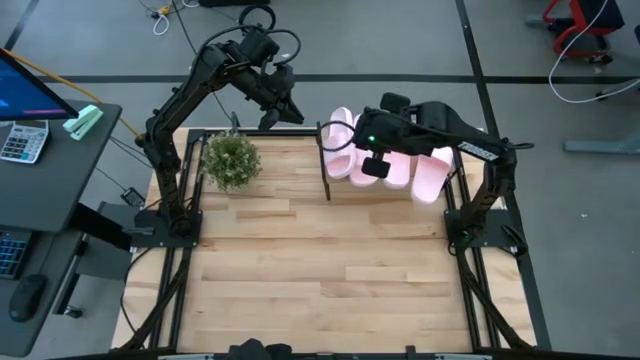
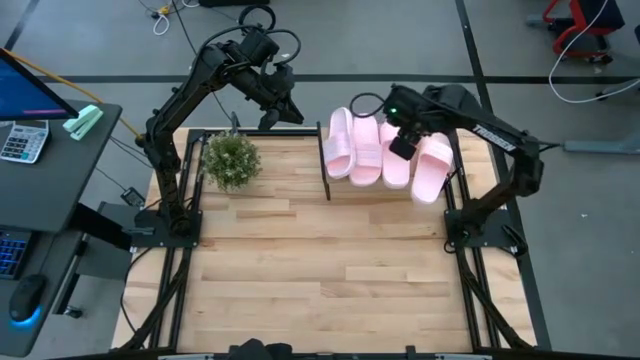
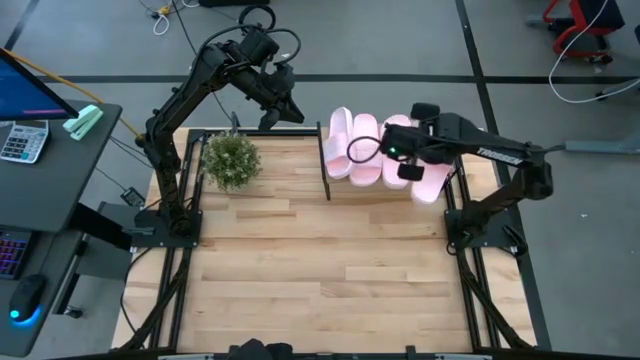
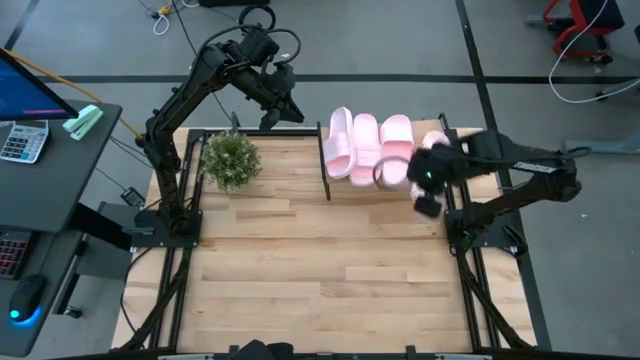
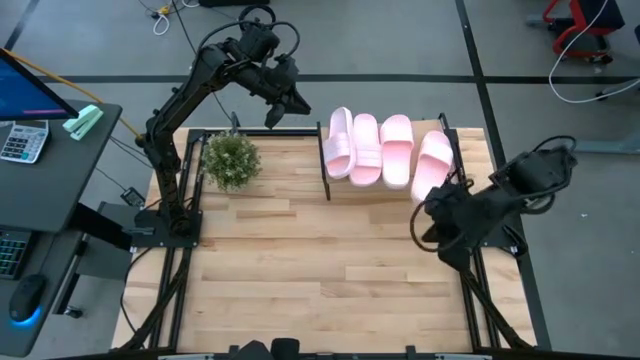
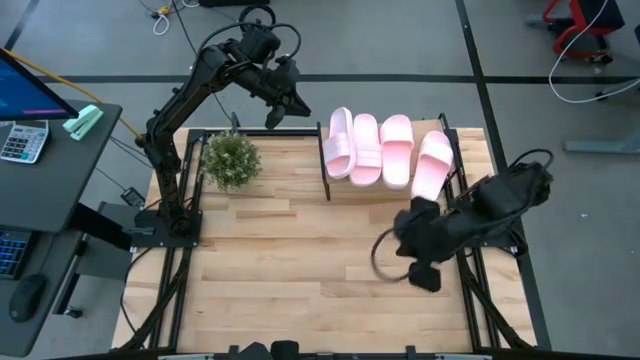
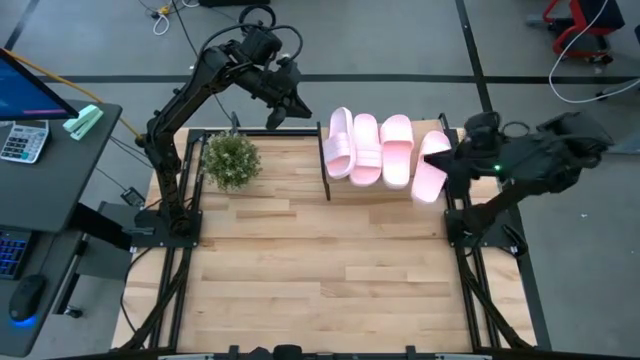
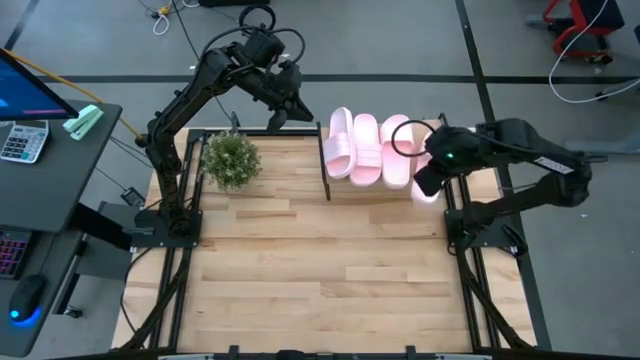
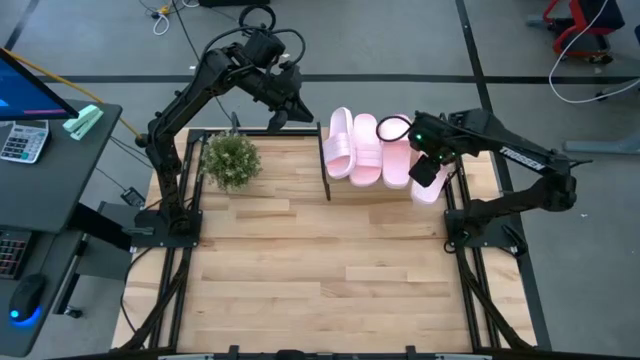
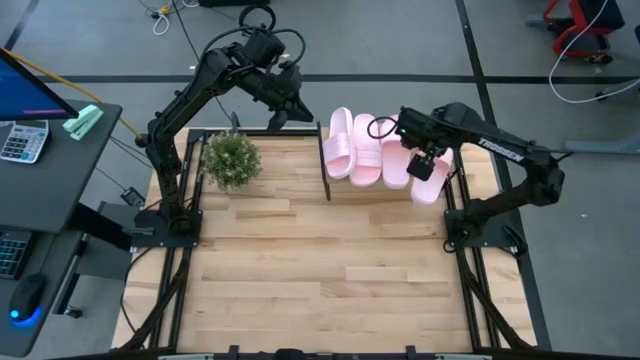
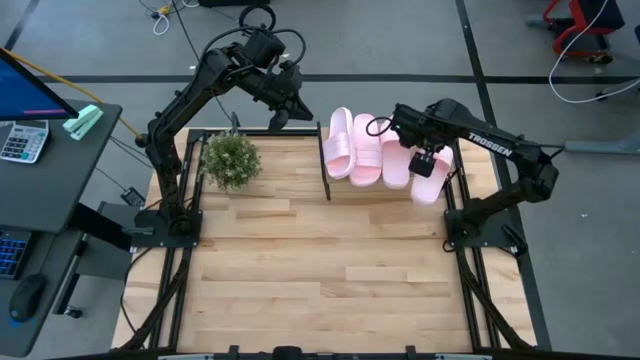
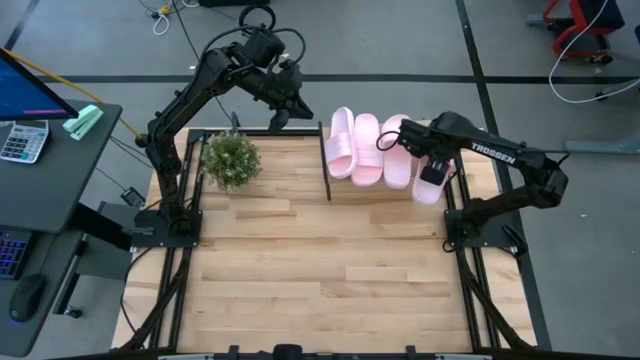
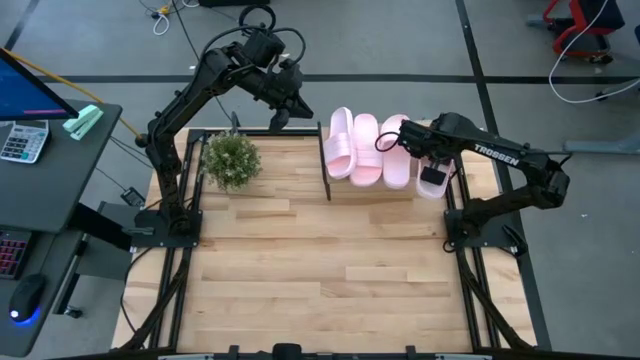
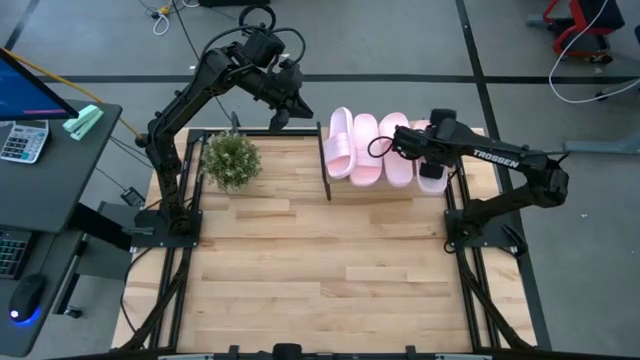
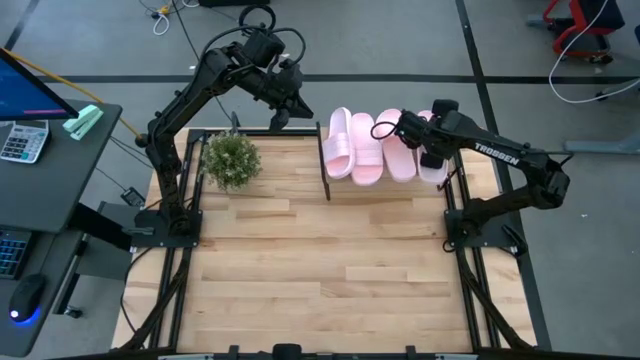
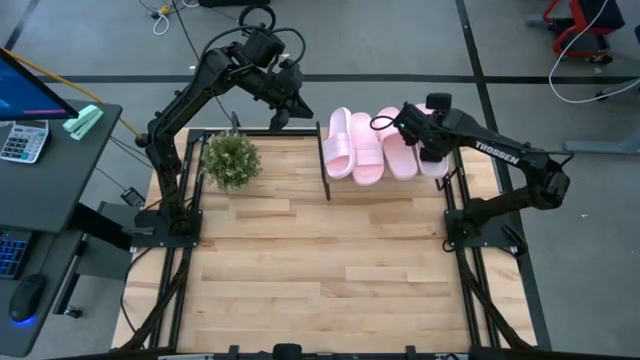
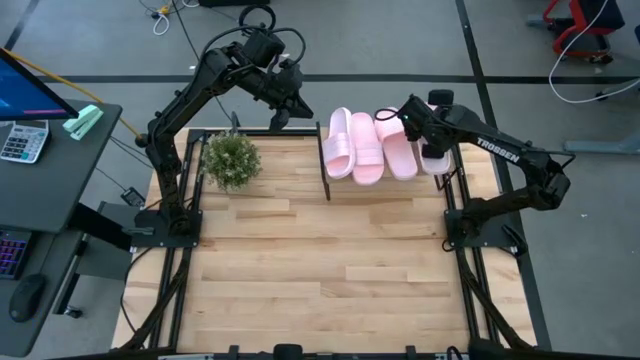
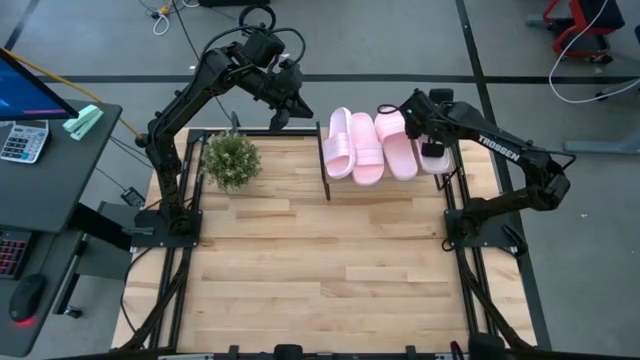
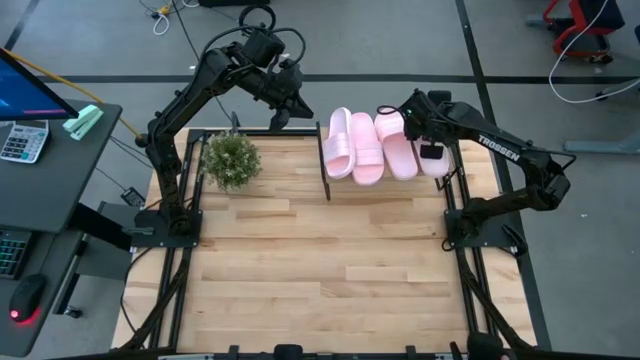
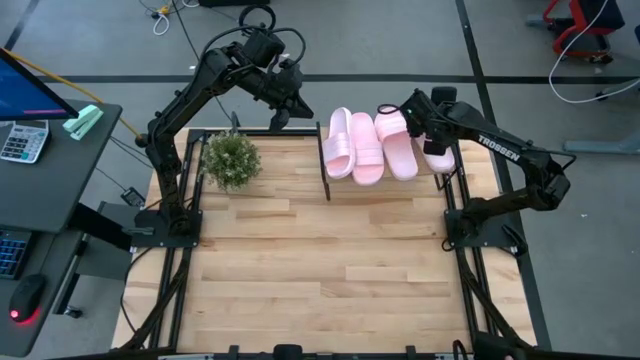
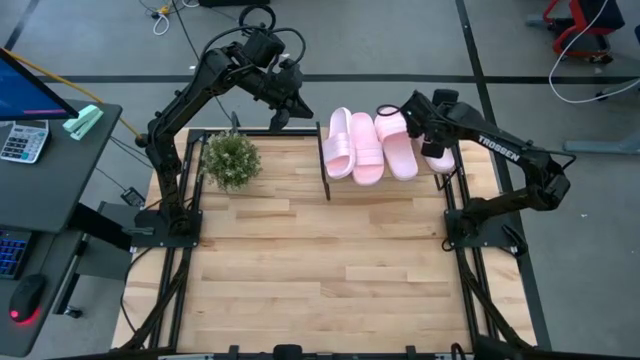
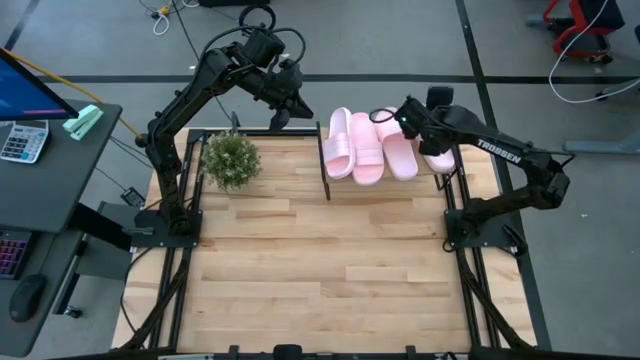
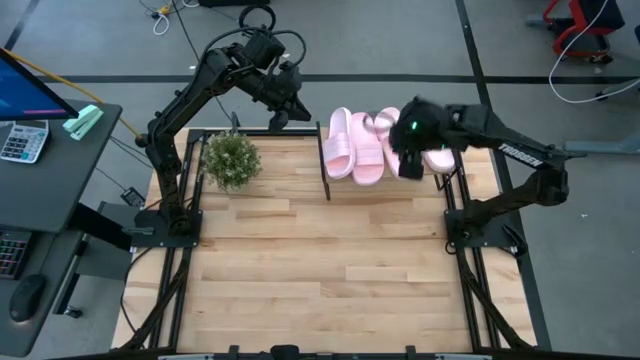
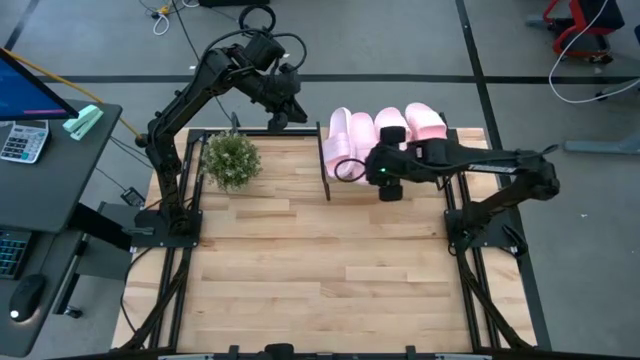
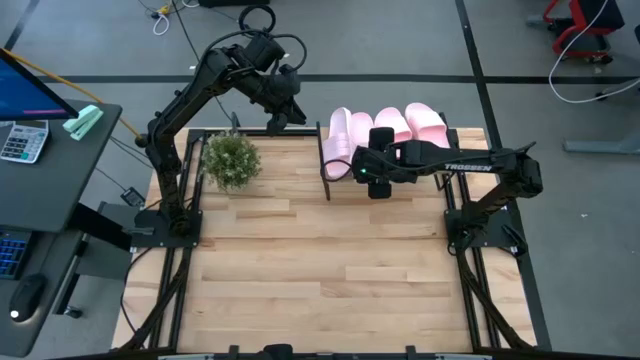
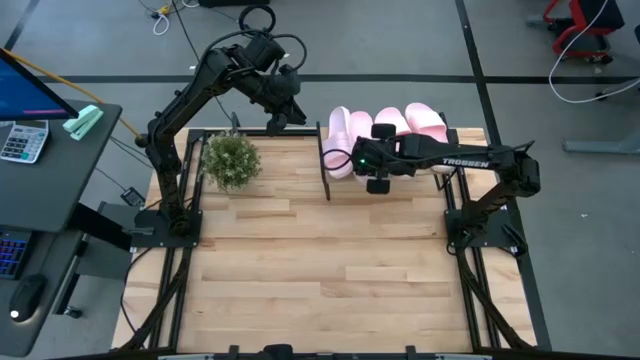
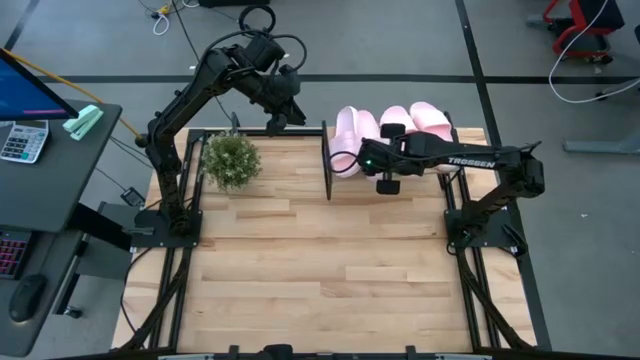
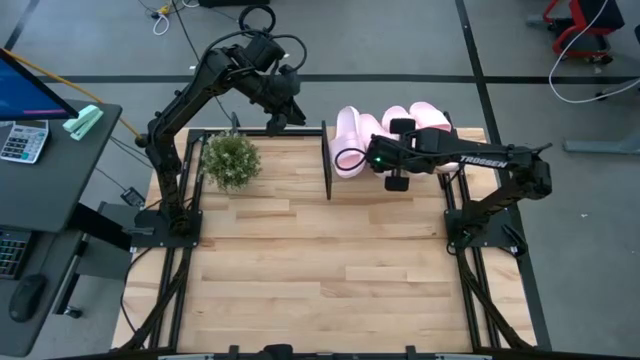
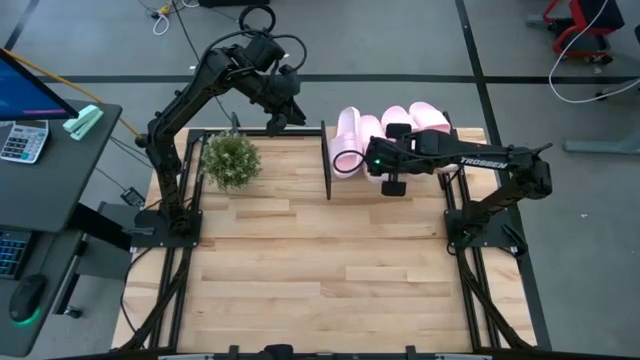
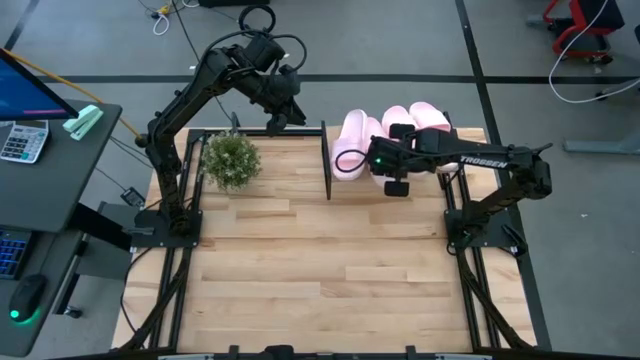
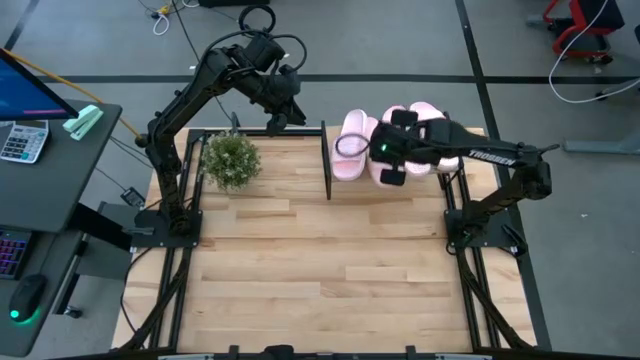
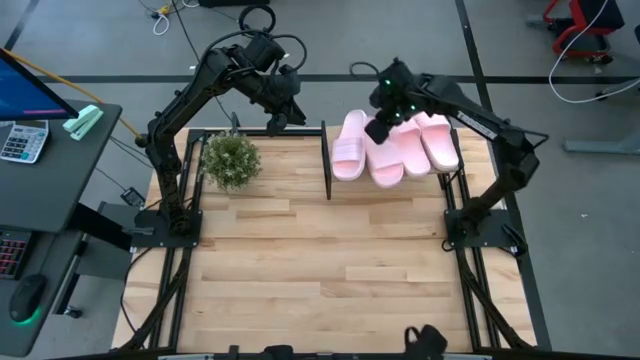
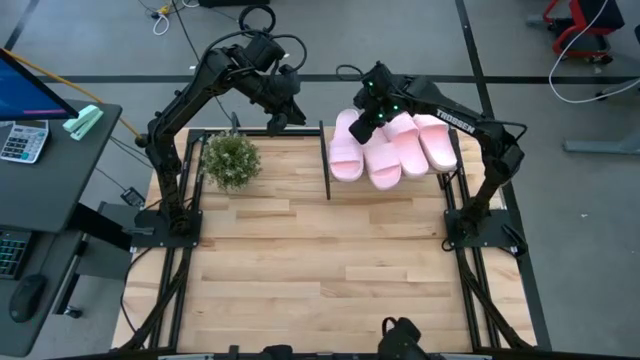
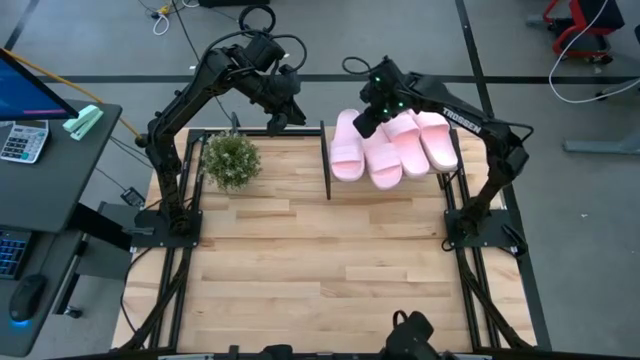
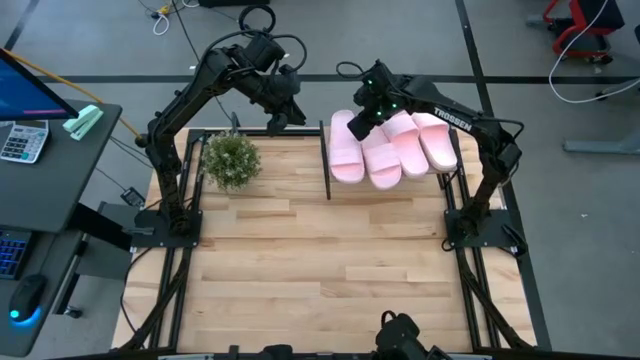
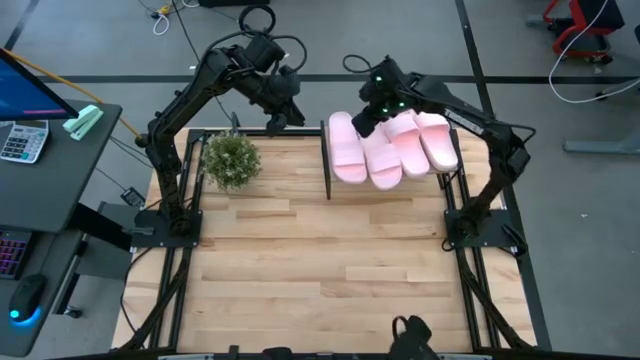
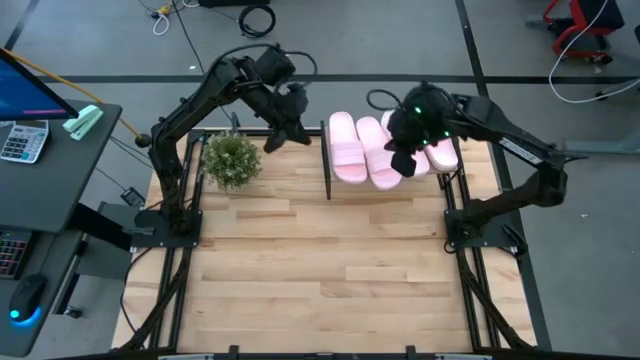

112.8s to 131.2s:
Task: Pick and place slides into the shelf
Adjust the slides on the shelf
